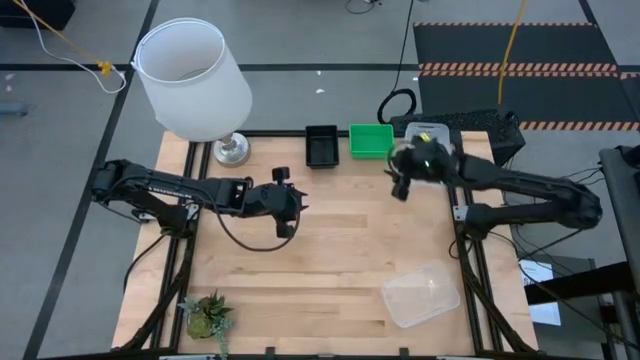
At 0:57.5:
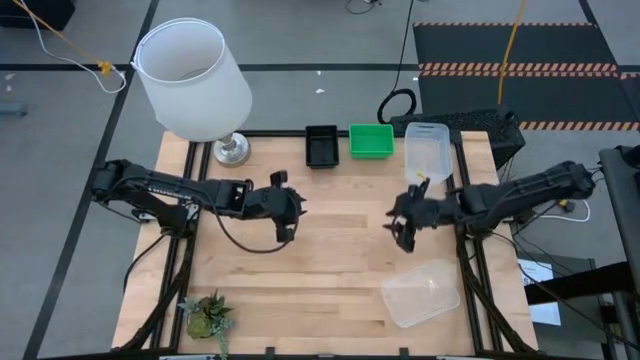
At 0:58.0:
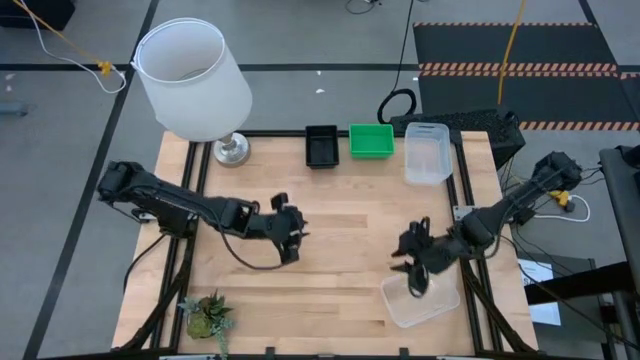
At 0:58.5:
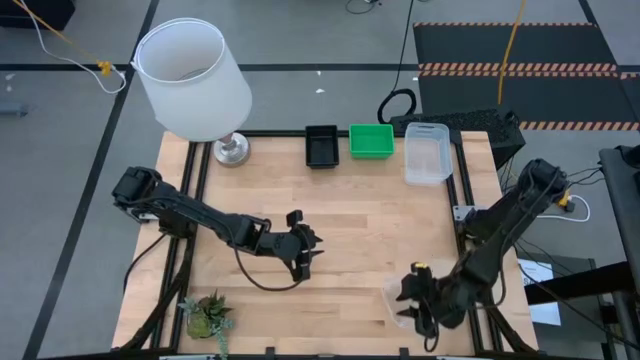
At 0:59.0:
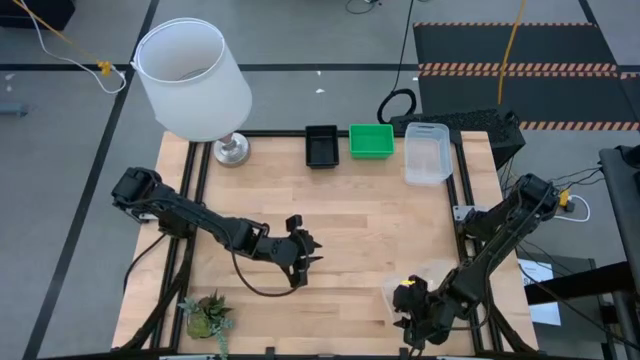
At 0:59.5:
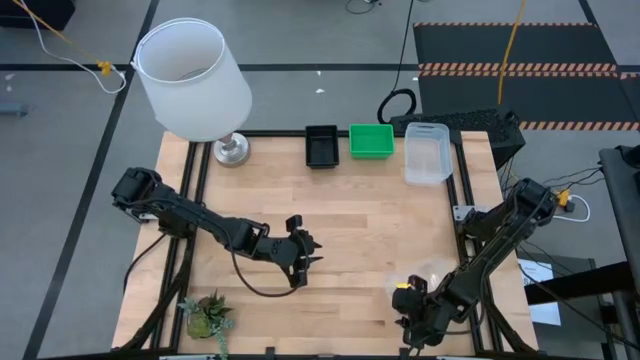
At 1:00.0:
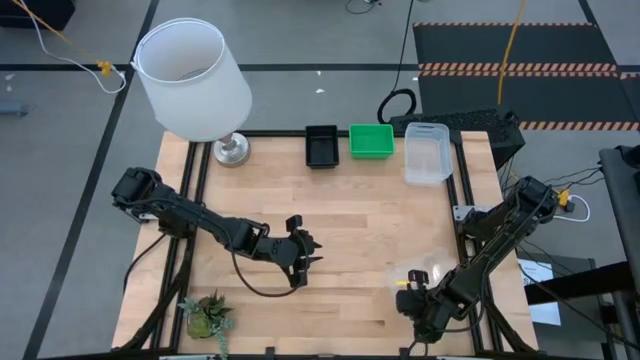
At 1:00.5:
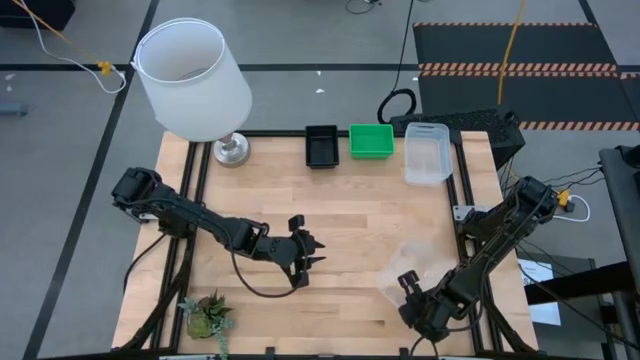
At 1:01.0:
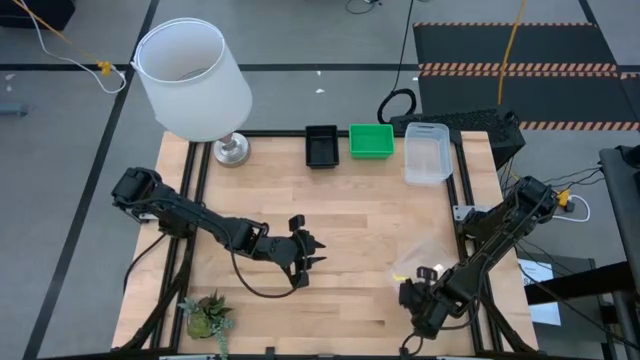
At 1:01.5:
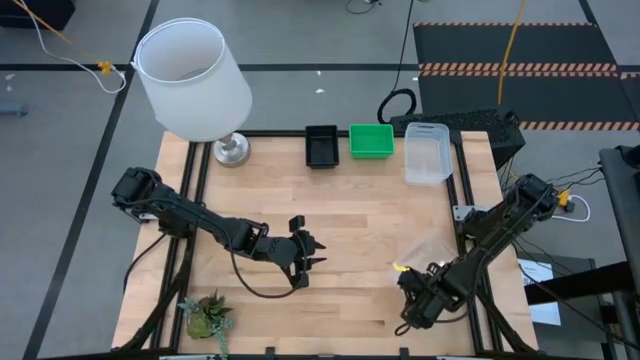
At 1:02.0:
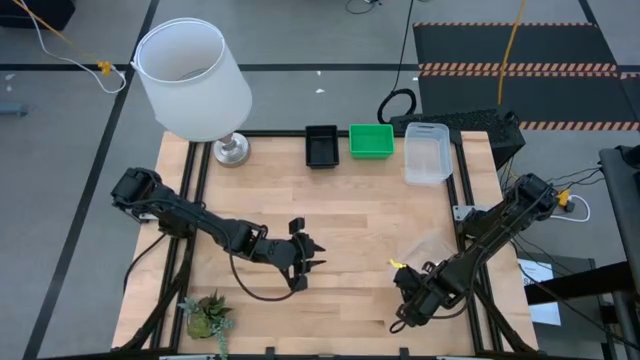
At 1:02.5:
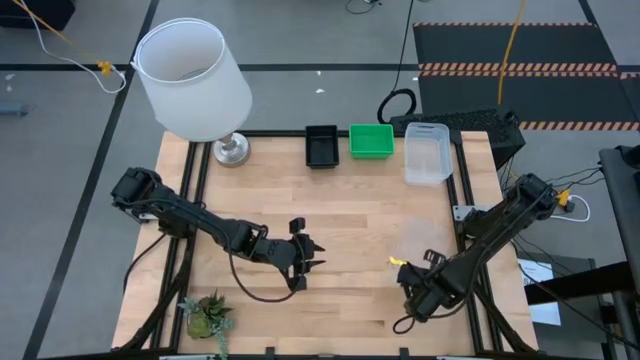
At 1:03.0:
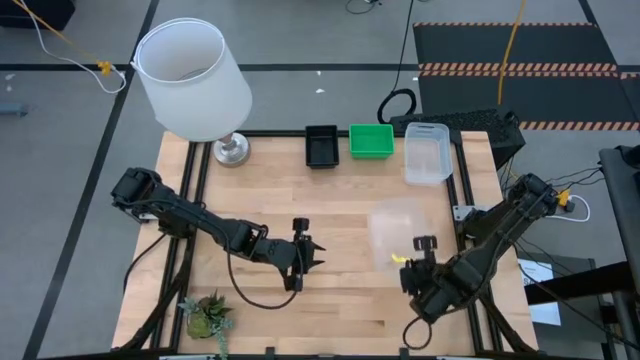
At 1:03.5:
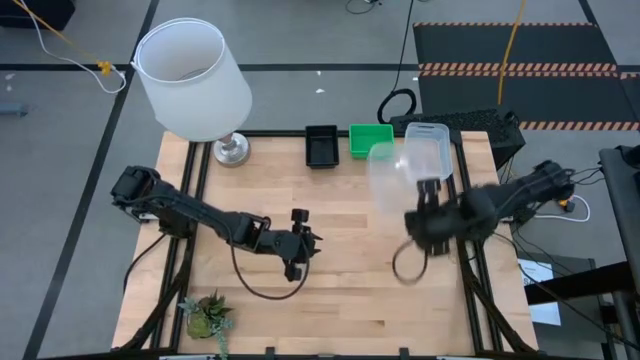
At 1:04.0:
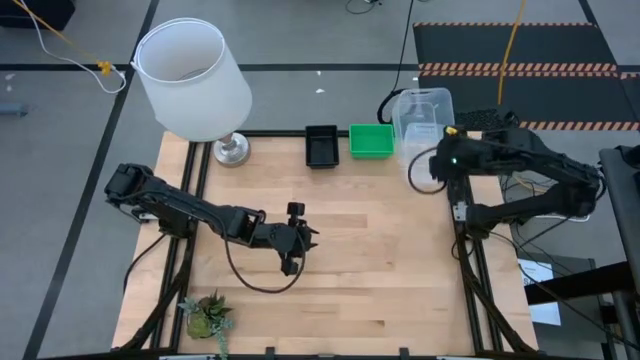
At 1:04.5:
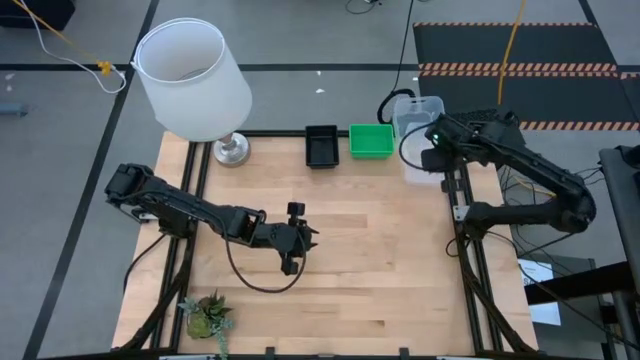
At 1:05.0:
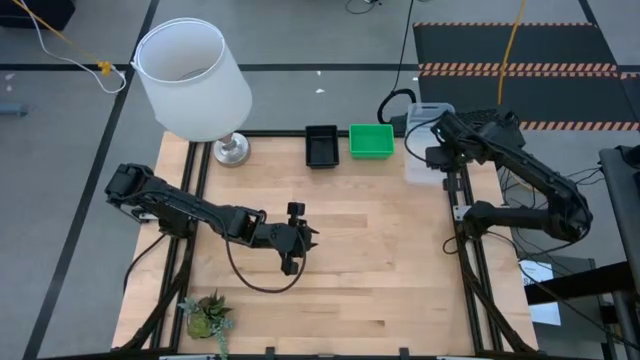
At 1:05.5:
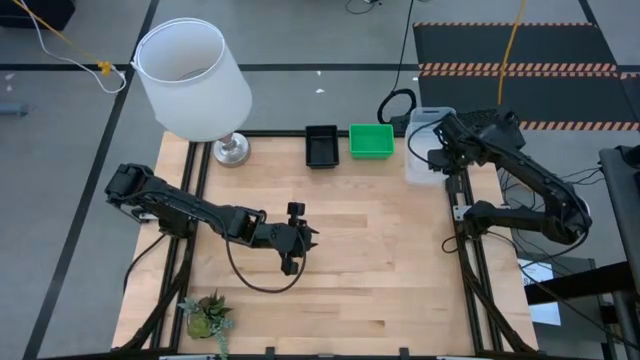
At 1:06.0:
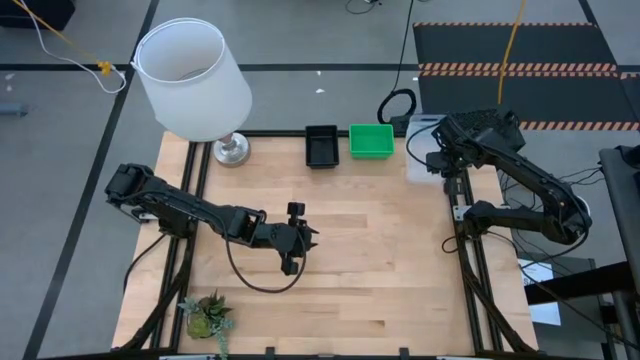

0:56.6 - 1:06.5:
Stack the bottom transparent bin on top of the top transparent bin

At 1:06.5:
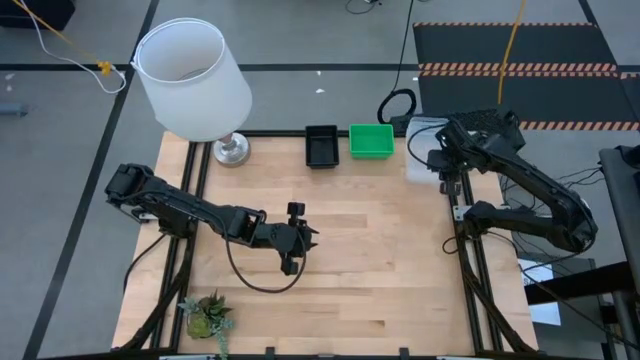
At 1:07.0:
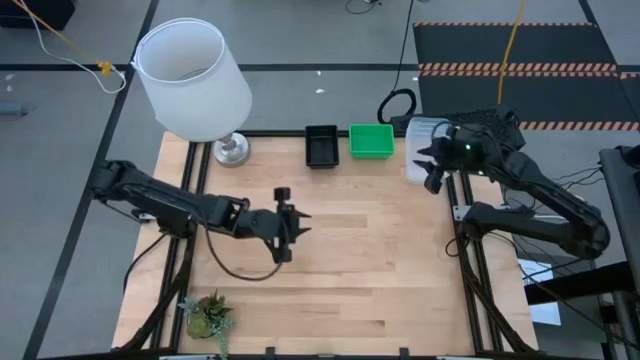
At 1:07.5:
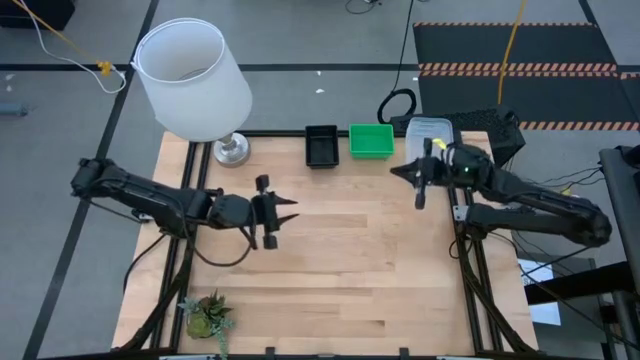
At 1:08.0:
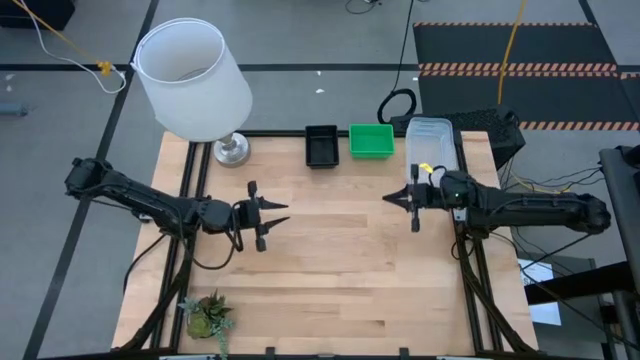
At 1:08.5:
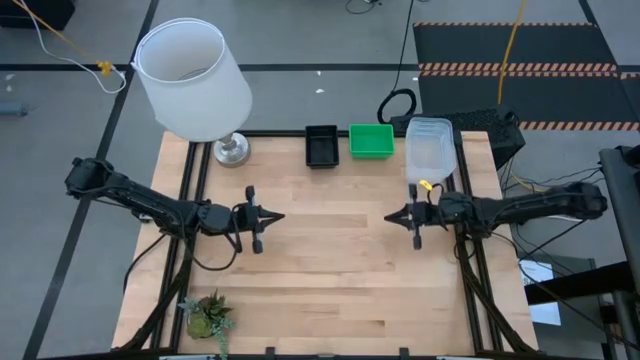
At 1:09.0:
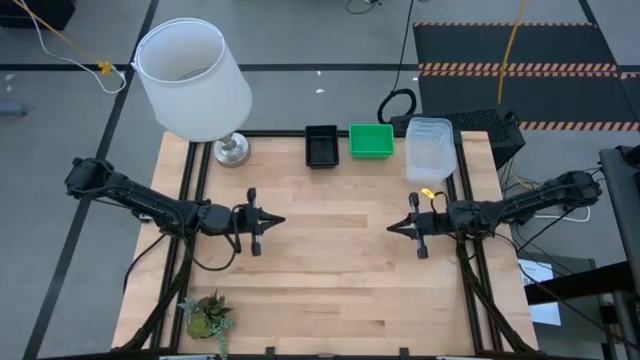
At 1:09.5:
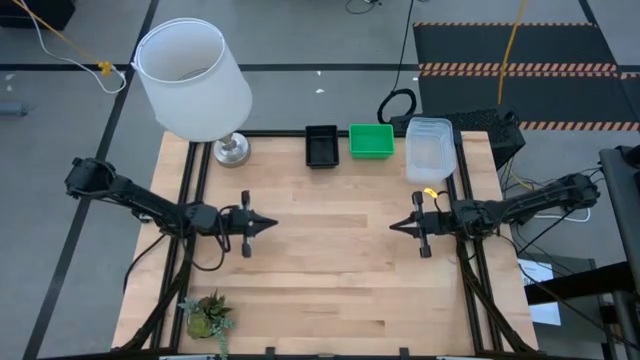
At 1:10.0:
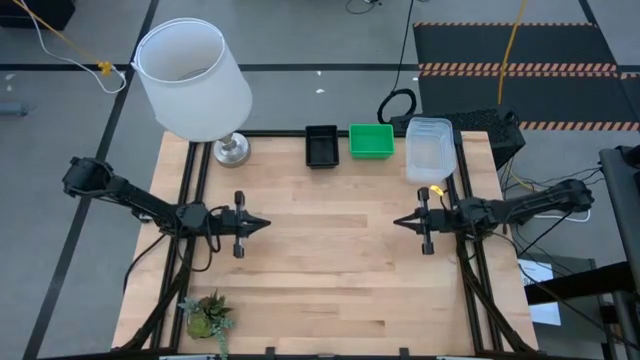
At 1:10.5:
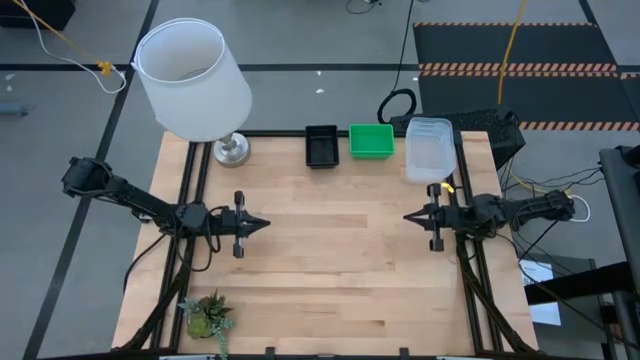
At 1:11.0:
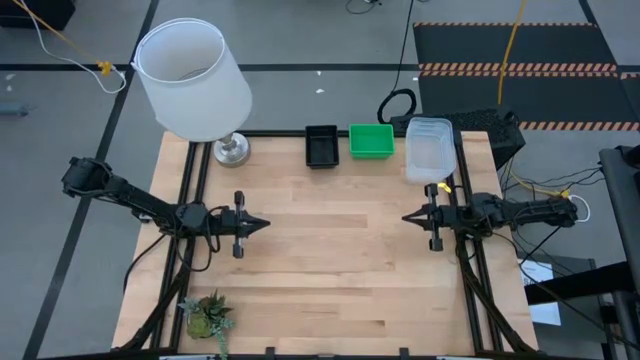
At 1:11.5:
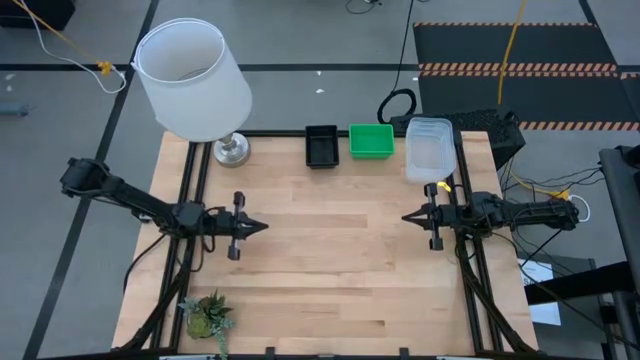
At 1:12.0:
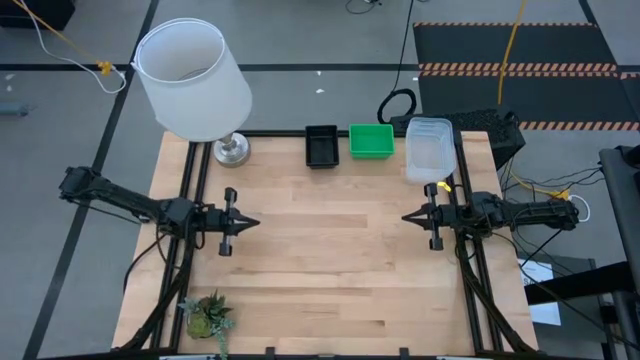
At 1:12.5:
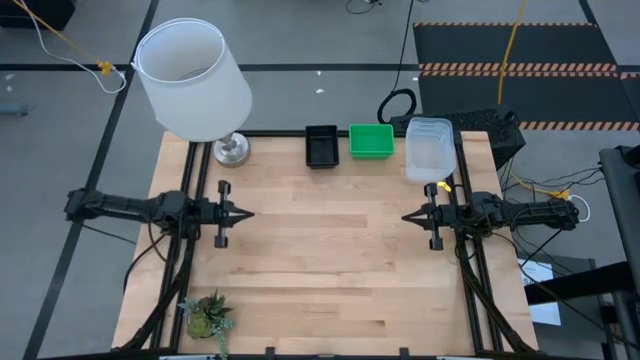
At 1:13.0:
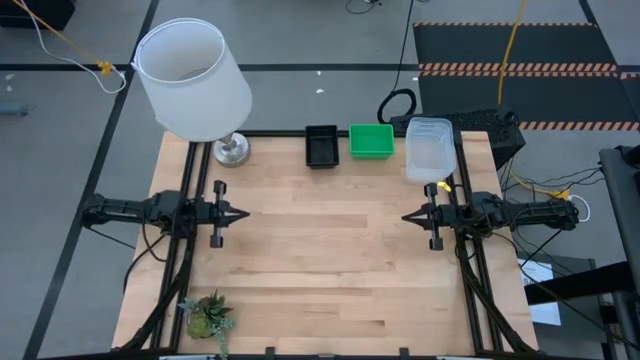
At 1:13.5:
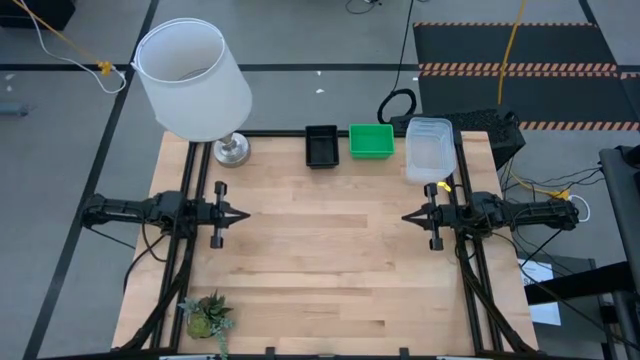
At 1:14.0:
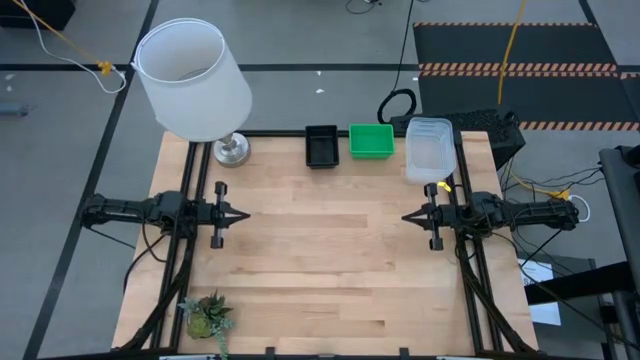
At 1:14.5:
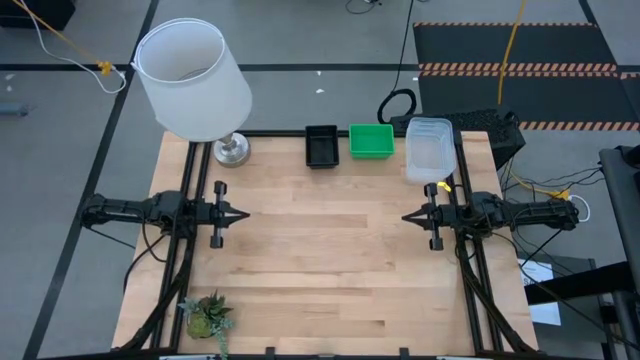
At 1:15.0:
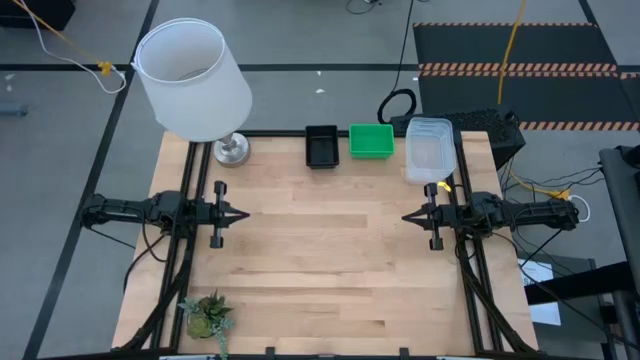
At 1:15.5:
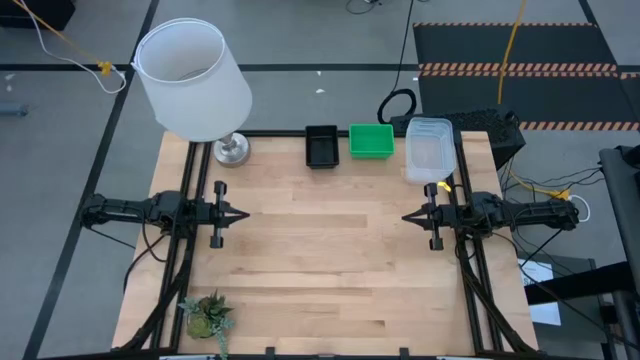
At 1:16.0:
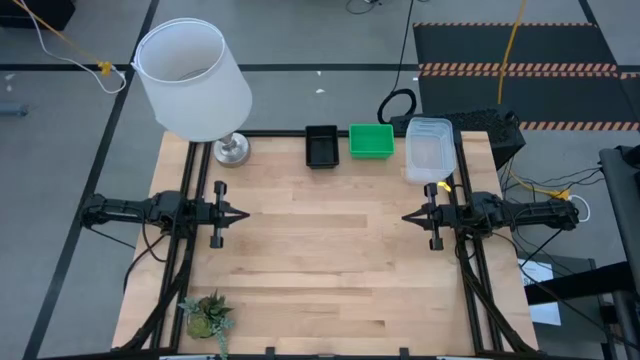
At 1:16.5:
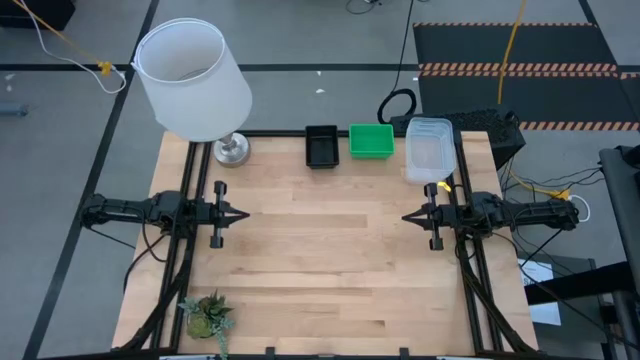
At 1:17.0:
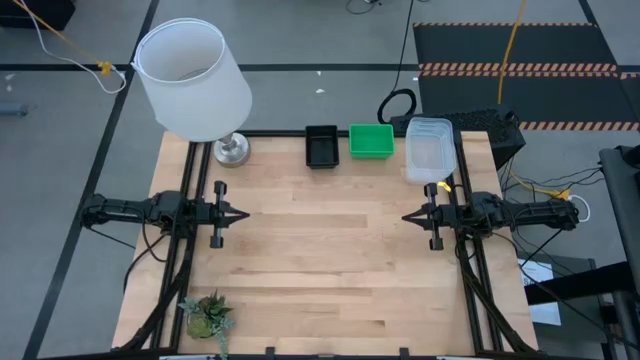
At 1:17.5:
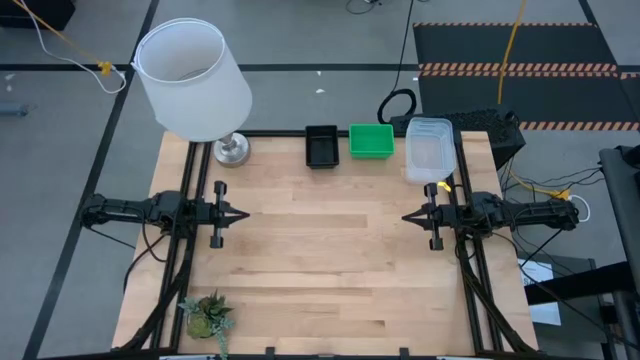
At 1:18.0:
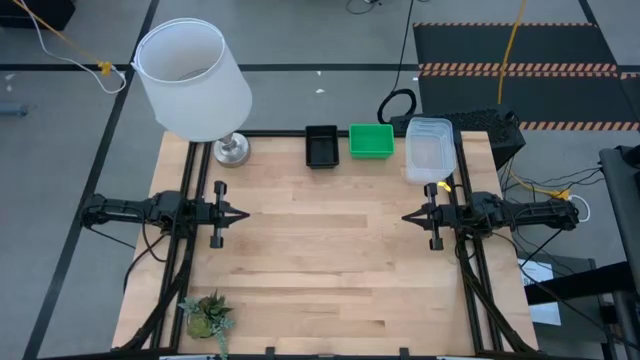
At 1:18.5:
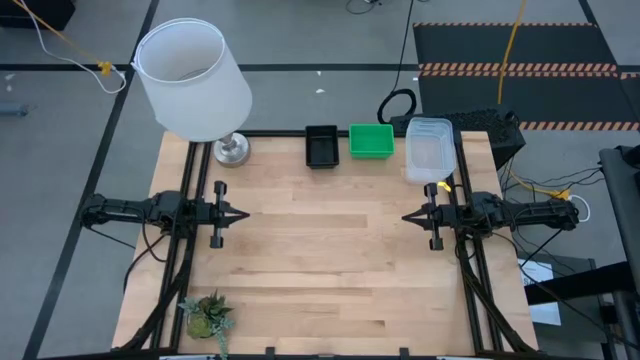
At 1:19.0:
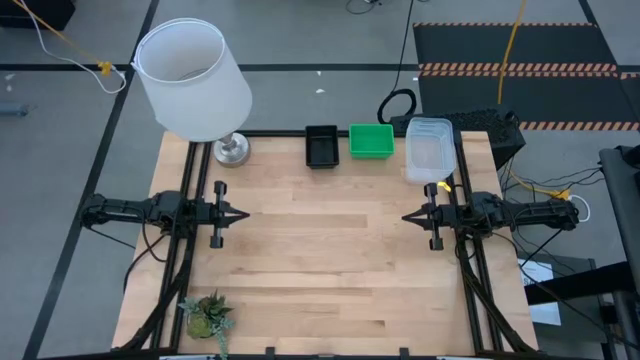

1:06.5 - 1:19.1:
Return to Home Position
